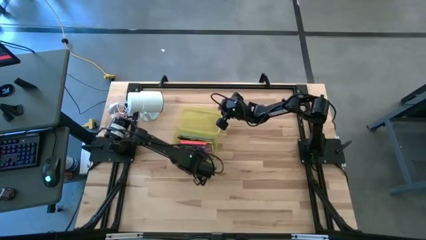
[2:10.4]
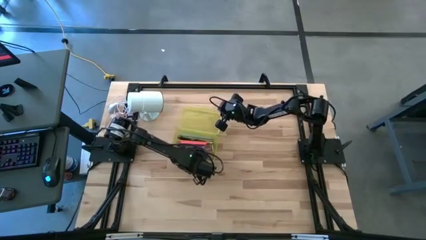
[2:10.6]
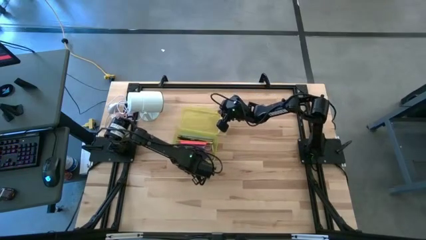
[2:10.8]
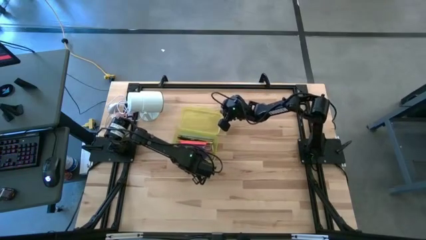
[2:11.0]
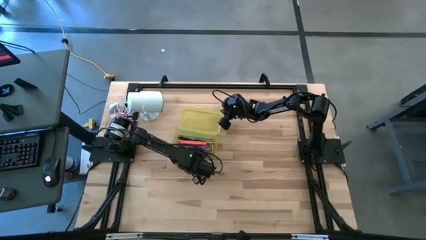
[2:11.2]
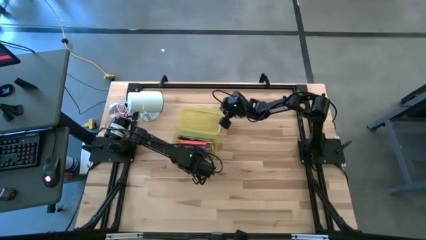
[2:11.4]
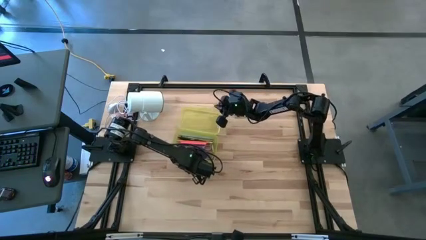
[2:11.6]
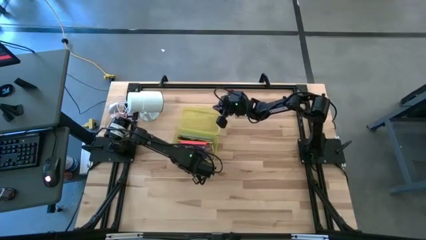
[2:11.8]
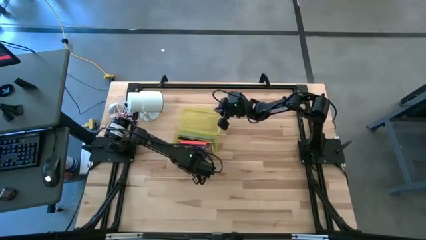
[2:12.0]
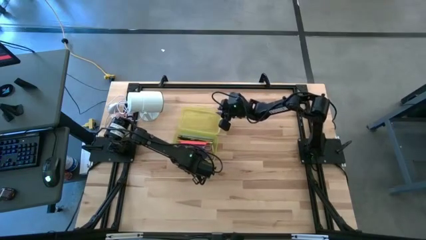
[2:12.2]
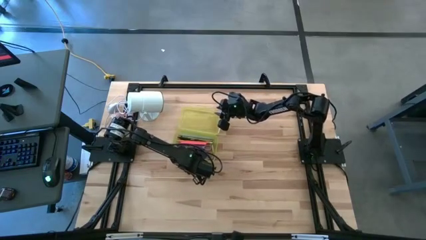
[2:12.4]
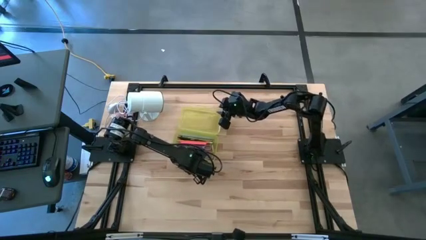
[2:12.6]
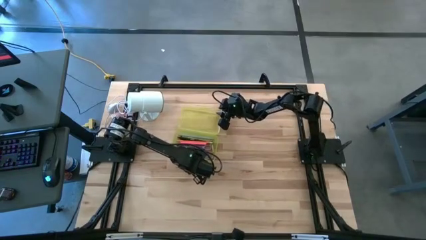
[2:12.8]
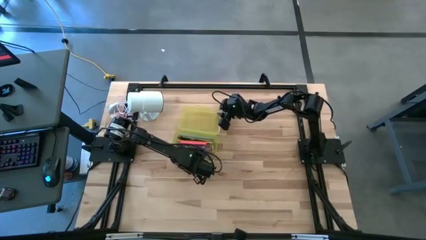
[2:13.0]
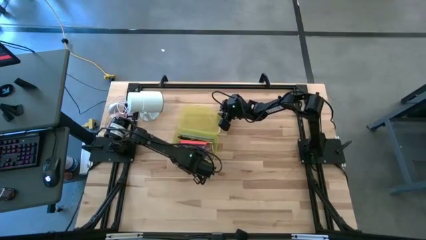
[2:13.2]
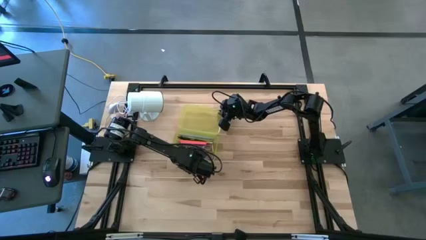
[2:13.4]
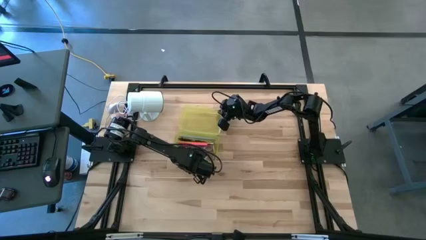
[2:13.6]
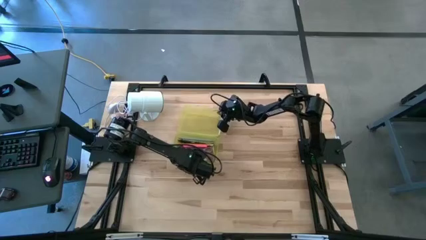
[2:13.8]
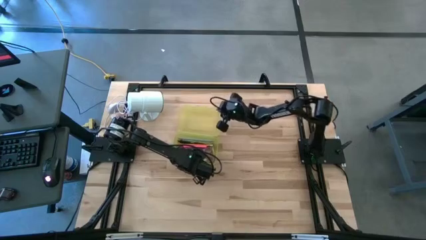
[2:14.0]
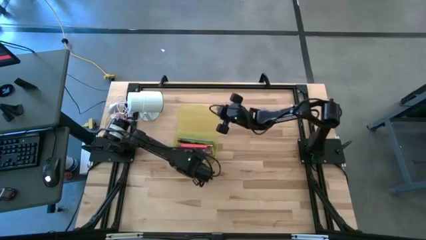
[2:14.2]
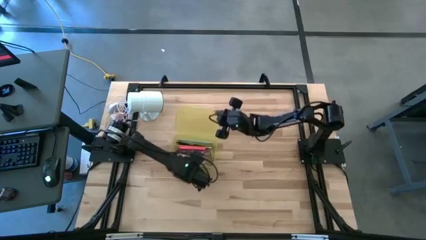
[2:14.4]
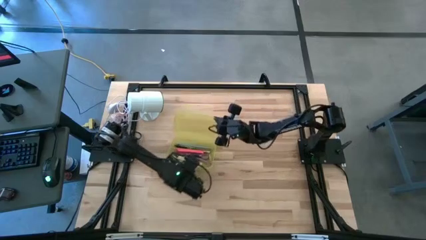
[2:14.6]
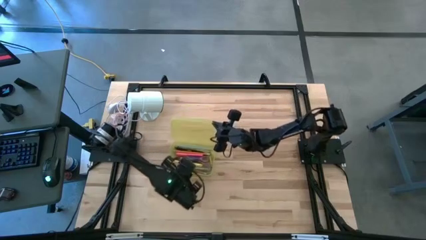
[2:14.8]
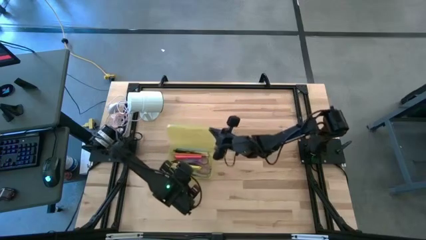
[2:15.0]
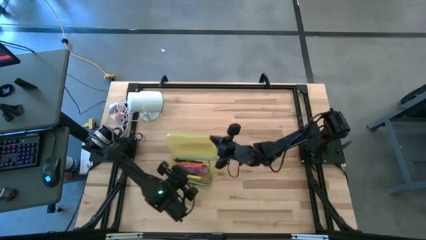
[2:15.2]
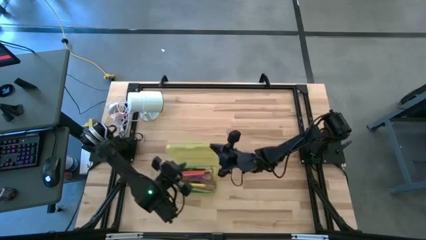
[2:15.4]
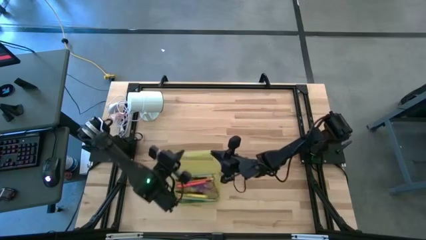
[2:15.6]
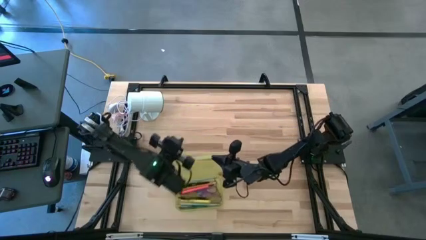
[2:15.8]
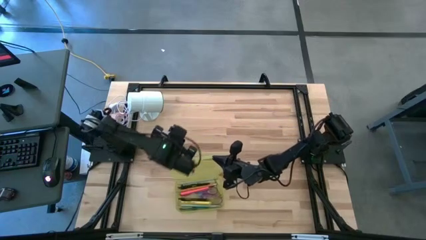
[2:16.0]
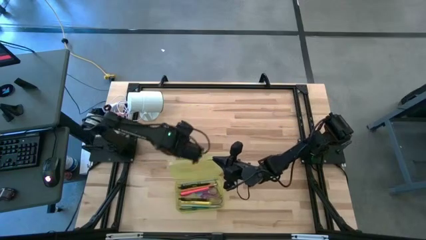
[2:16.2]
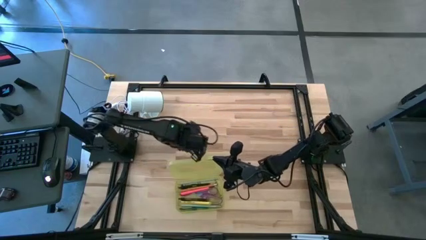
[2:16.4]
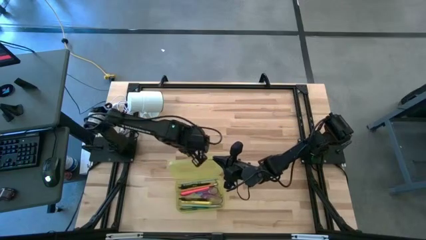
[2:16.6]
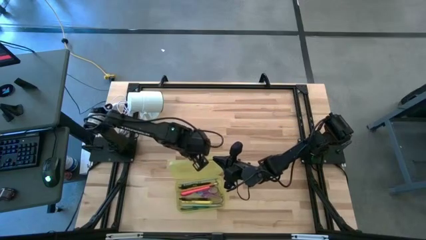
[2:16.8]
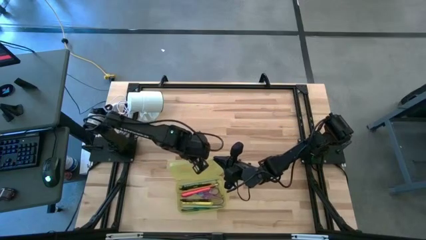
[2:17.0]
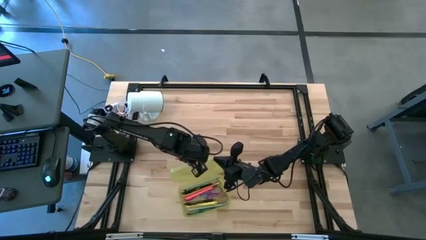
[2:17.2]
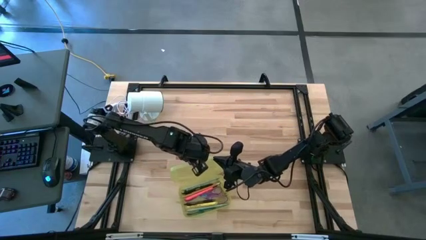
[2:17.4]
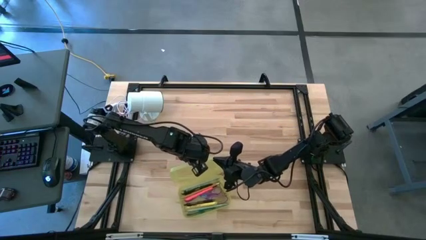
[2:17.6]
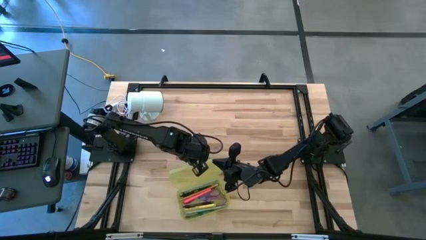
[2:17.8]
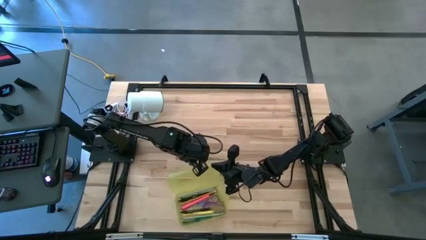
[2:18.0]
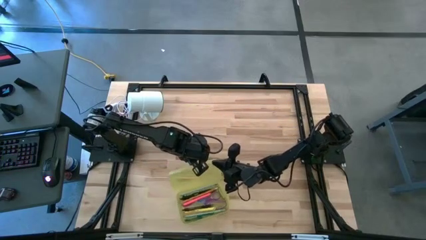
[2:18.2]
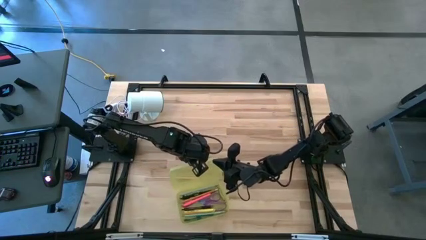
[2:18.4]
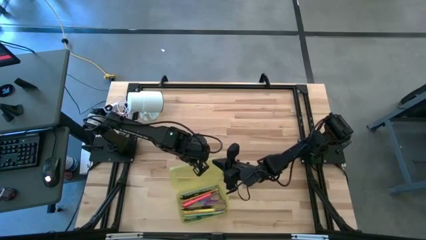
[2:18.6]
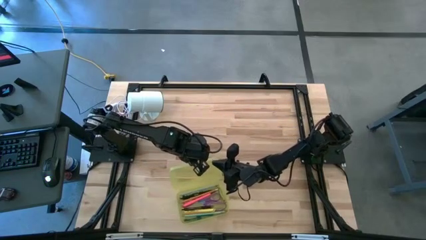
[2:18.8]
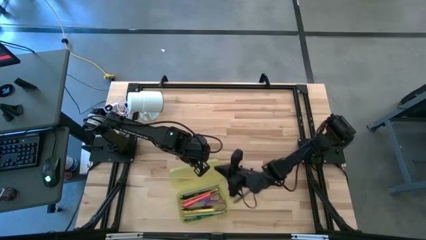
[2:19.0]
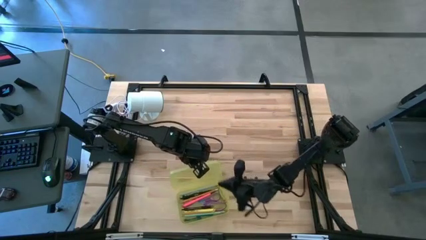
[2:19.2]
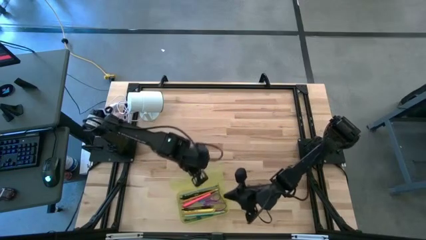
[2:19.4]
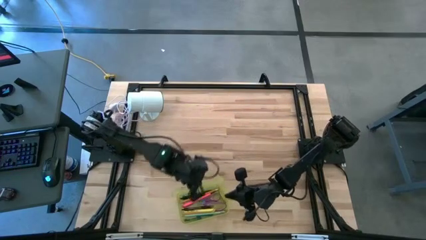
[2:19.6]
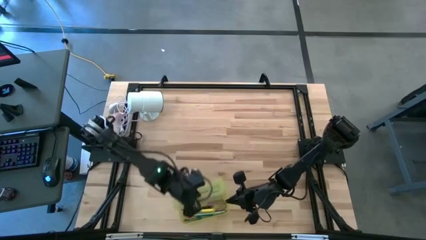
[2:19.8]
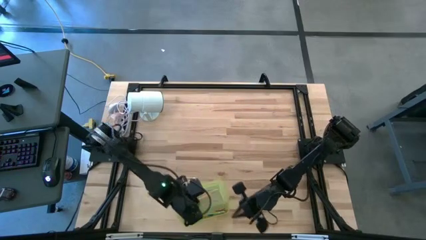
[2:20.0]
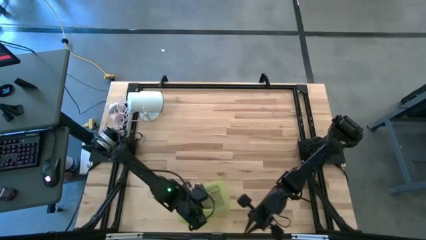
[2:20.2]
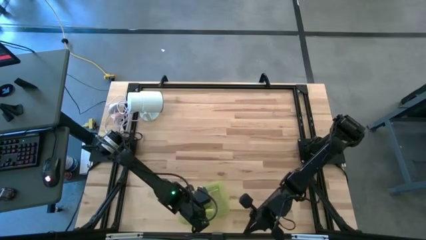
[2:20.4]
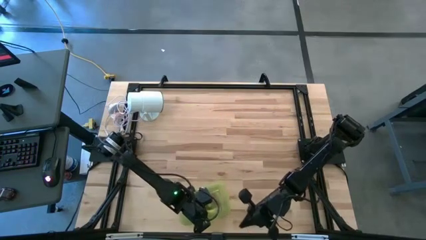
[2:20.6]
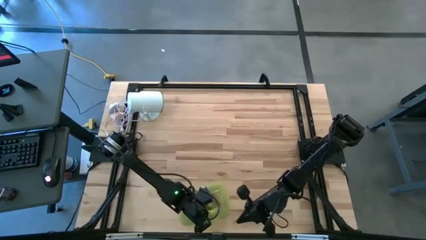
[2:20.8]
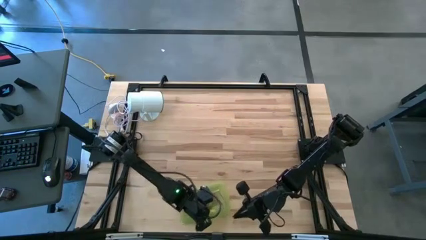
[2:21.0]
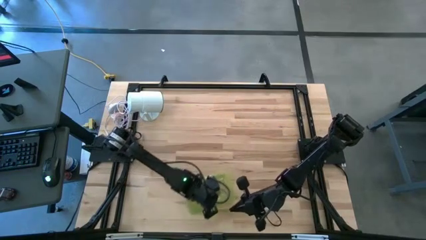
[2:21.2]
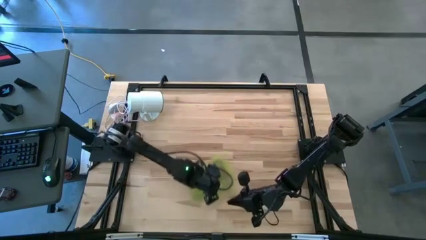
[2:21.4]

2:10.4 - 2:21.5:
Task: Pick & place school supplies into a supply box
Close the supply box lid
